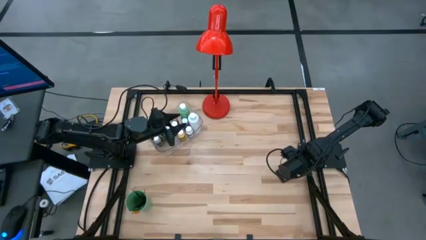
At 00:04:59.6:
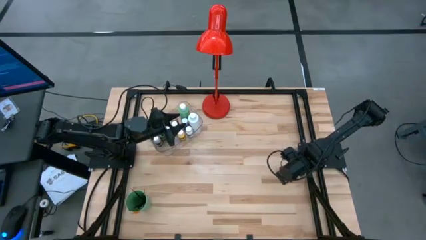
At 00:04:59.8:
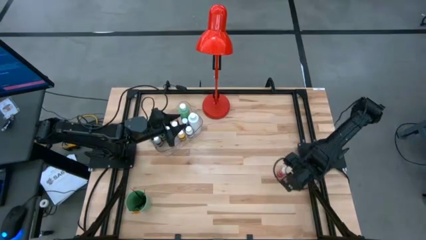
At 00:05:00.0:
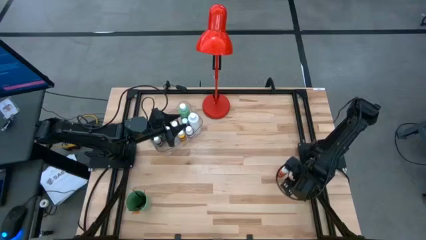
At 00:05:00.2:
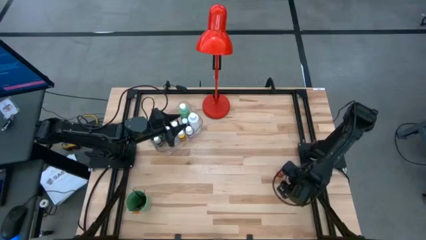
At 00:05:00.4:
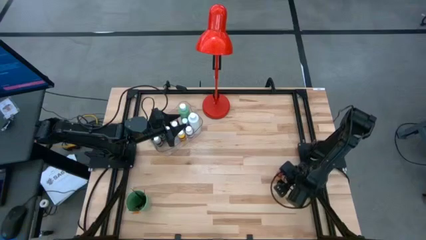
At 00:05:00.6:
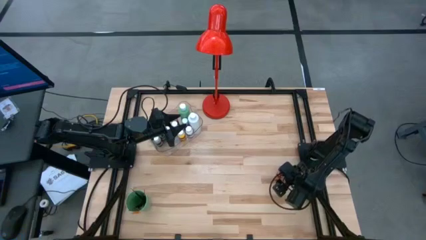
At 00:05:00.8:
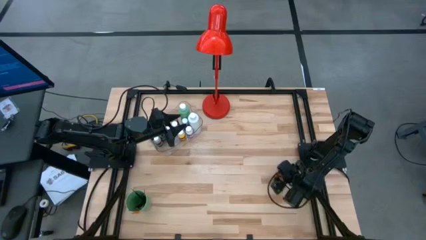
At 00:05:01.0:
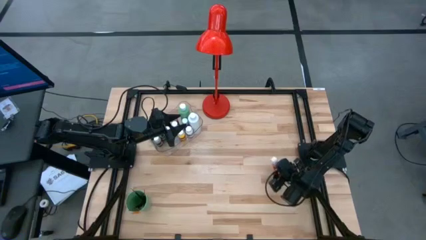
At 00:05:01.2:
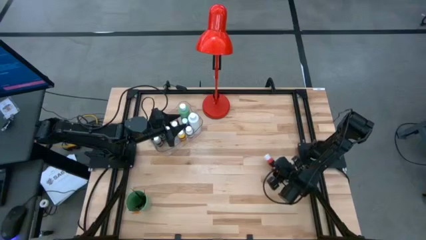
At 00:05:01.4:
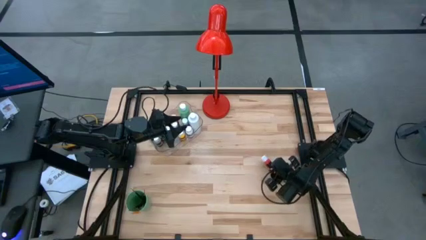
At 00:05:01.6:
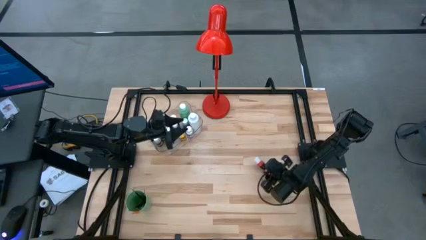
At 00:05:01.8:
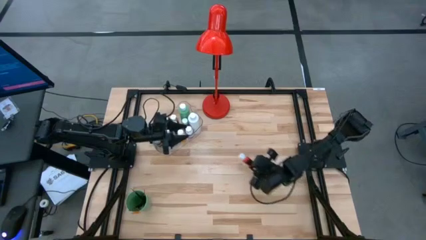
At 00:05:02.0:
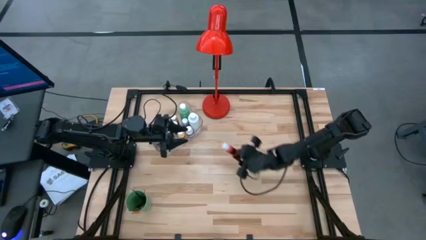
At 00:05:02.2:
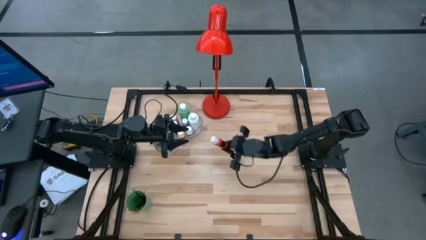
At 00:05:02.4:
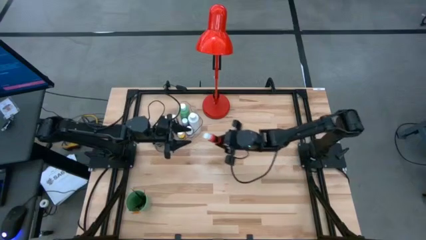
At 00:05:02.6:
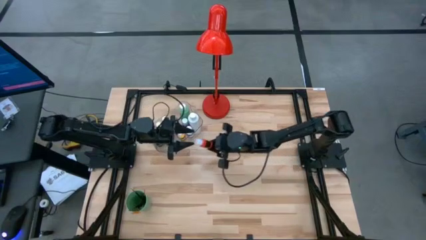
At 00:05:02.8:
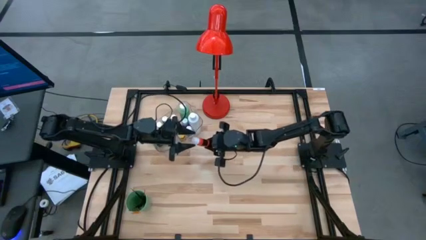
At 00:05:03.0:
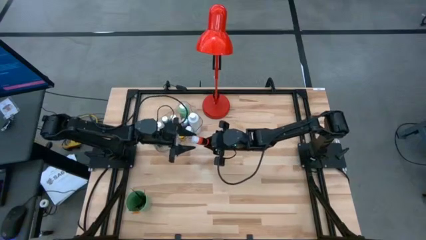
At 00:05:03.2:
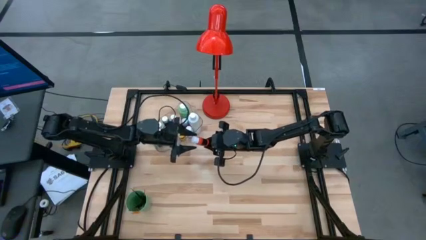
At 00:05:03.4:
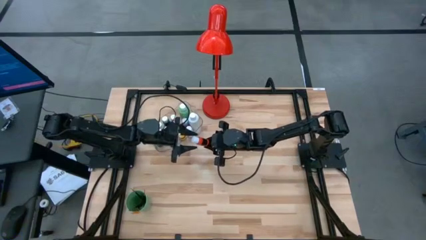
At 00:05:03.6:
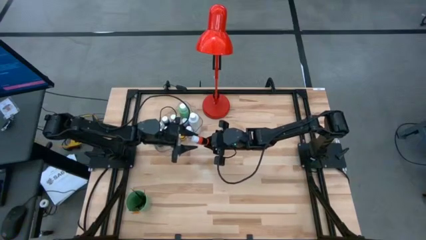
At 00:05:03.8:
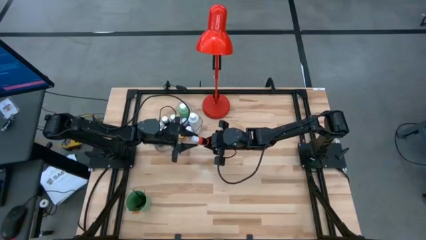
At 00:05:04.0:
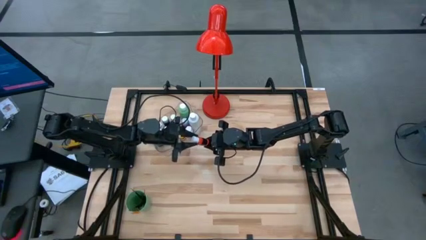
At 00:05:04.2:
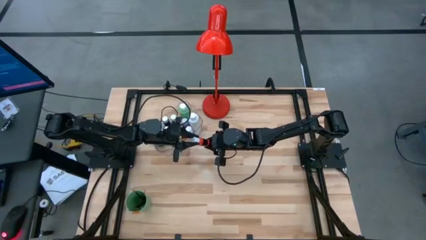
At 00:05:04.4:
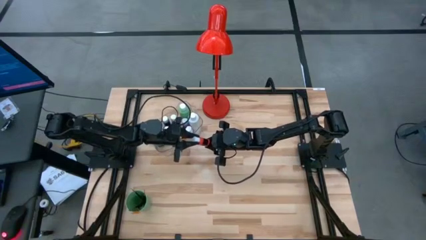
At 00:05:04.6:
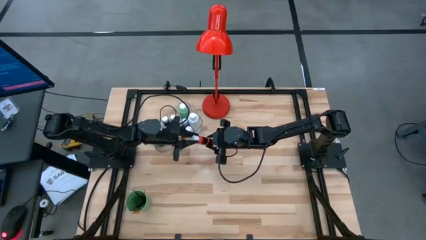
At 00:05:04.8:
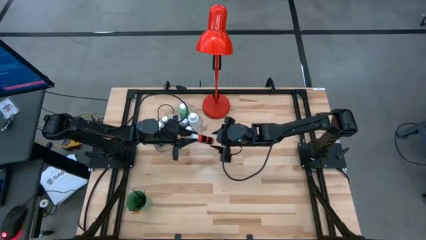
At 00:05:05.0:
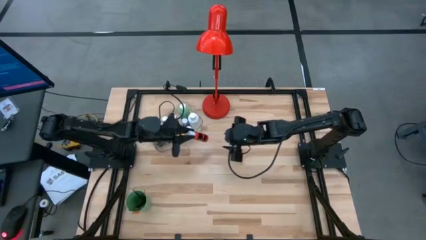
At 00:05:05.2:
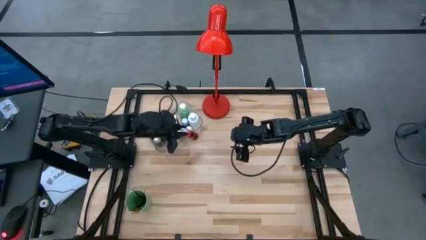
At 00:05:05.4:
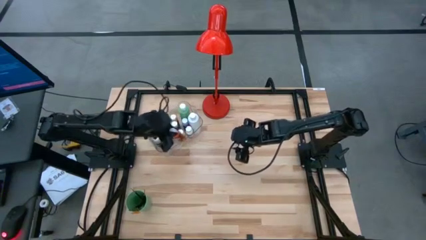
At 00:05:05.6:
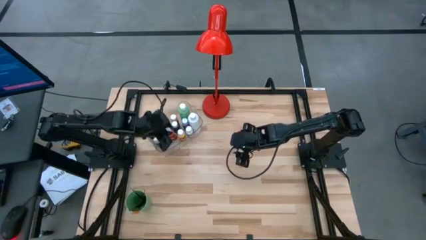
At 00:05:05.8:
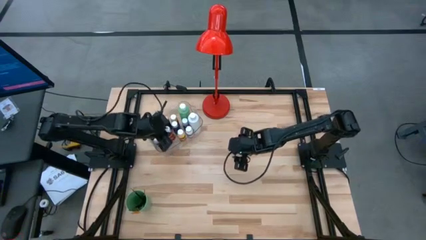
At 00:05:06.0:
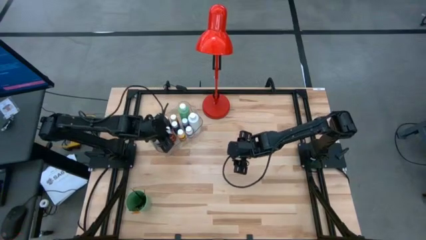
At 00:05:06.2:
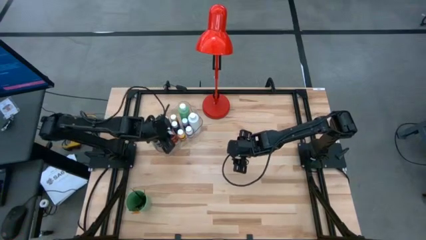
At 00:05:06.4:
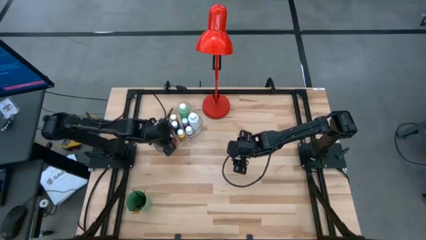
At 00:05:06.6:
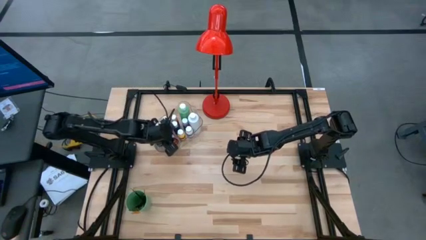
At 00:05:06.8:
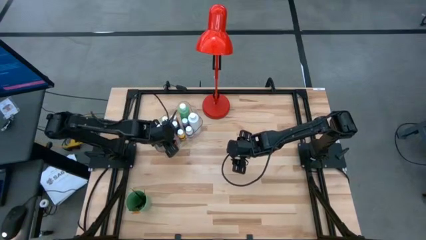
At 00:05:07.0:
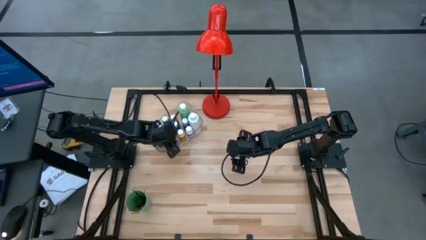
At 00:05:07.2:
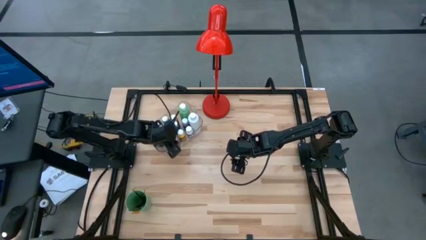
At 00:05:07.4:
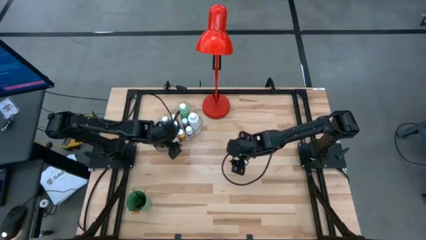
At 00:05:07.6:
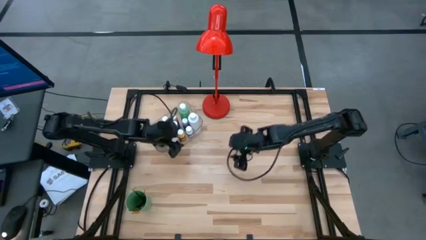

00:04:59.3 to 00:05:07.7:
Task: Pick & Place Paint Supplies
Put the orange paint bottle into the transparent bin

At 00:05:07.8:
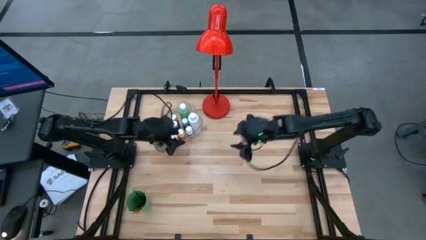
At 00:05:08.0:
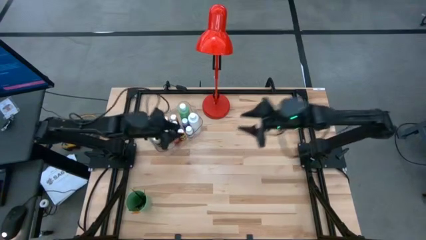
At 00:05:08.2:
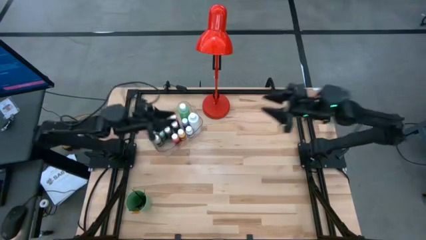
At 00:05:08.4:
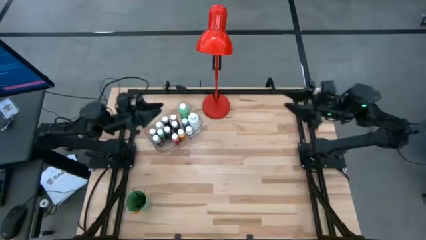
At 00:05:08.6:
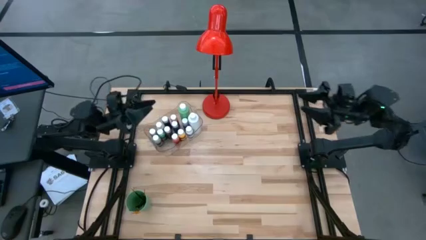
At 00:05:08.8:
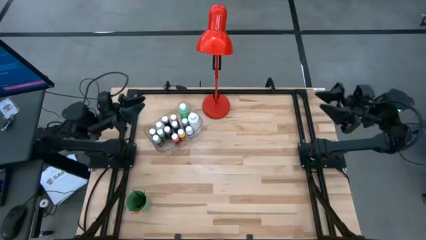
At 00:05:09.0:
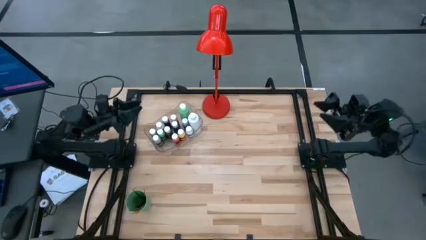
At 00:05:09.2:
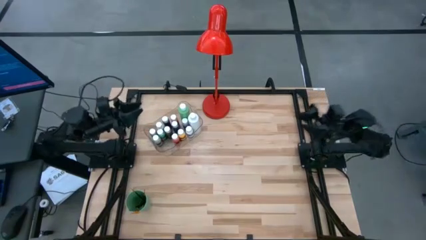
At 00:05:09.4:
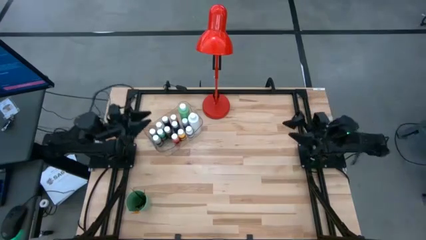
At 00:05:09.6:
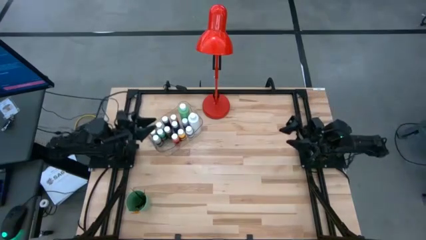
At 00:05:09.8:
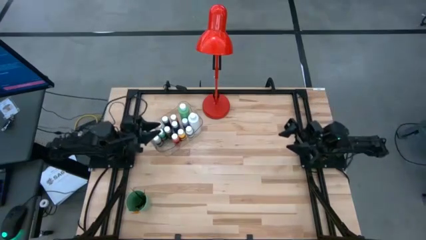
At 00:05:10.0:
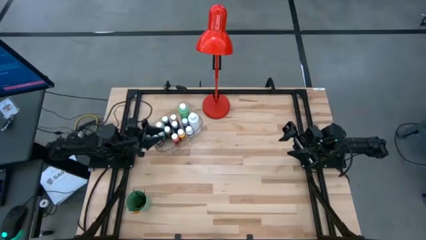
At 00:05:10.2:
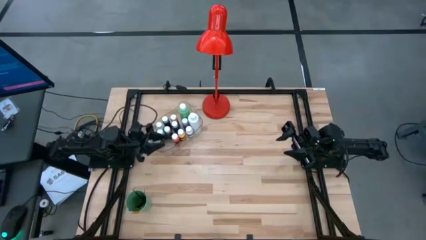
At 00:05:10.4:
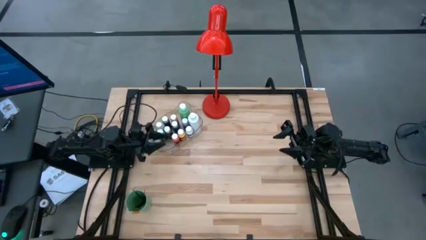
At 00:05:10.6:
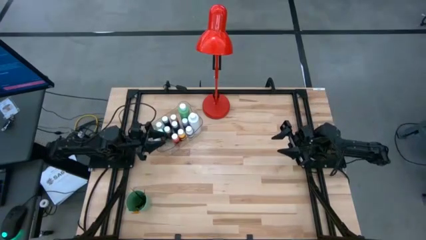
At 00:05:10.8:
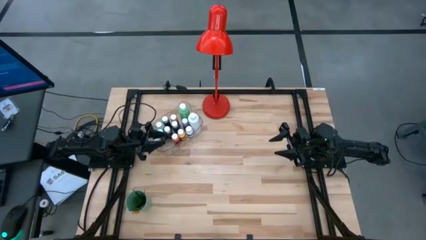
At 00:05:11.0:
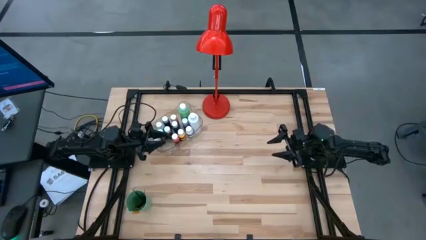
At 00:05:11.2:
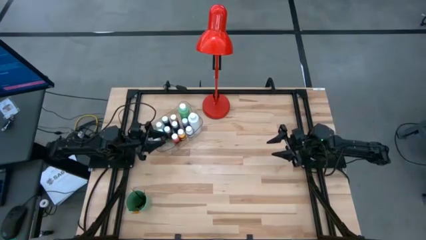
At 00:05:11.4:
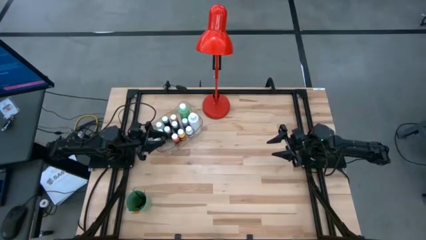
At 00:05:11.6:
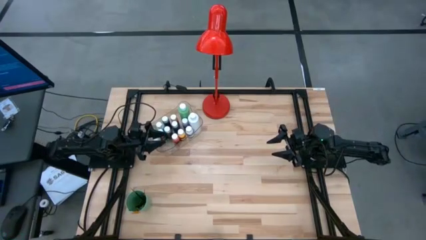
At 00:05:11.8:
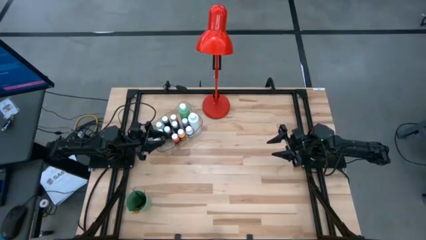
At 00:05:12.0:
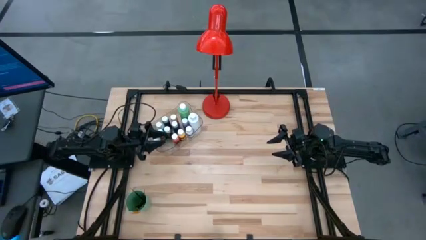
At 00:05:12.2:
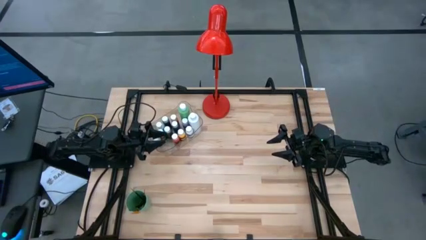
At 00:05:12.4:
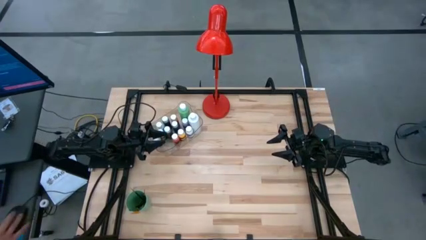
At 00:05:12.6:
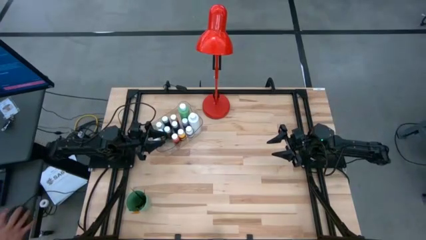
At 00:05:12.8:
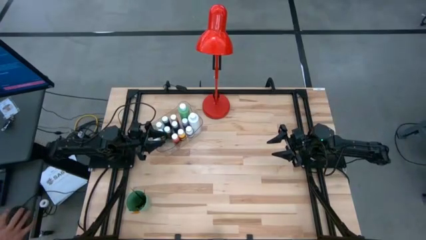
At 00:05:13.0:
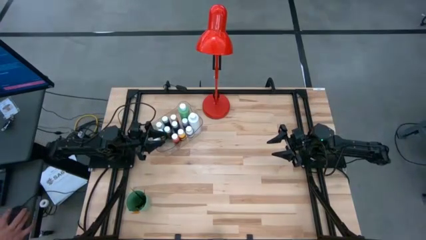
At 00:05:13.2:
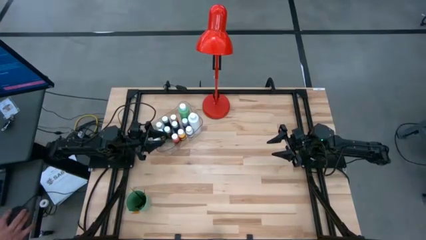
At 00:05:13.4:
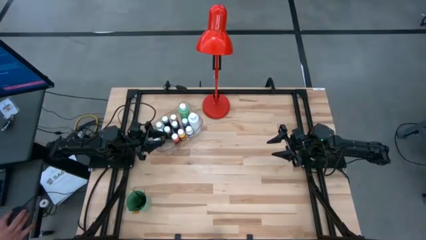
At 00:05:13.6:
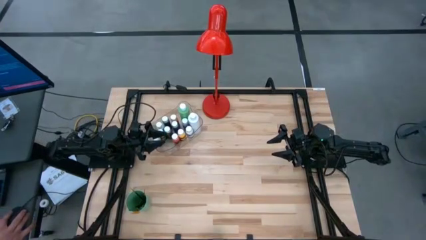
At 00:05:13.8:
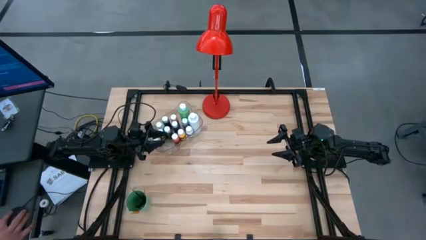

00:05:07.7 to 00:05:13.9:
Return to Home Position
